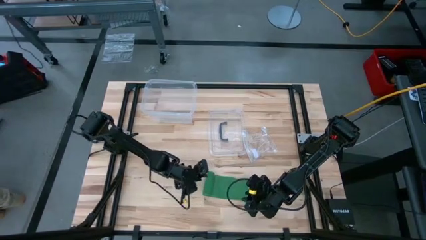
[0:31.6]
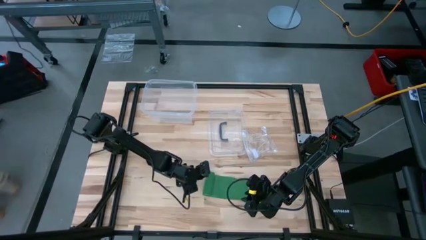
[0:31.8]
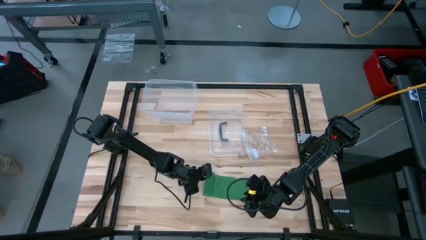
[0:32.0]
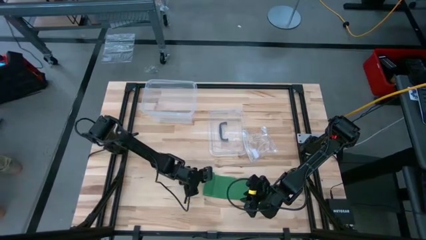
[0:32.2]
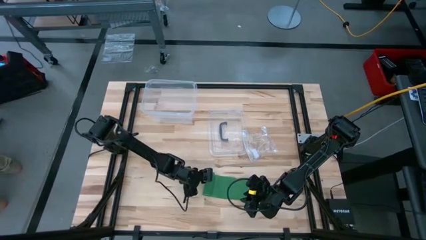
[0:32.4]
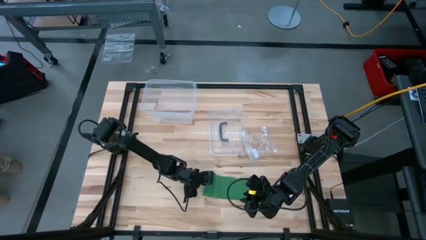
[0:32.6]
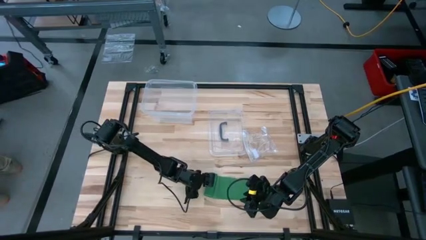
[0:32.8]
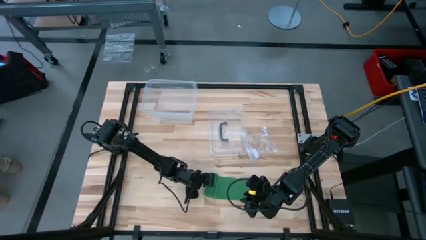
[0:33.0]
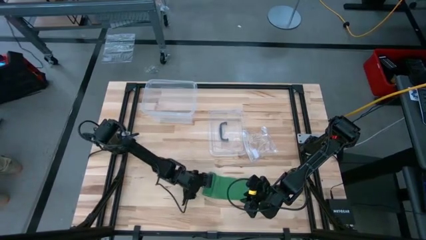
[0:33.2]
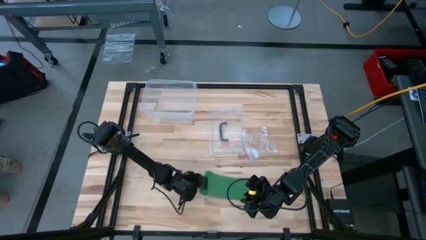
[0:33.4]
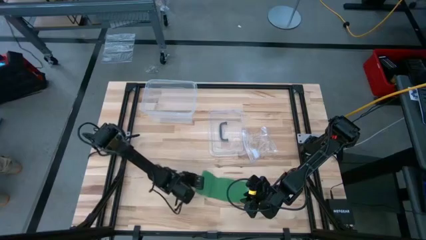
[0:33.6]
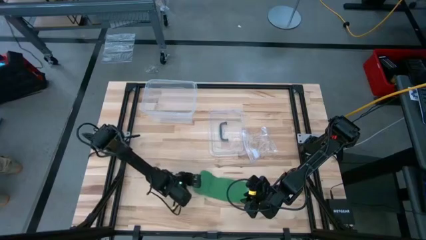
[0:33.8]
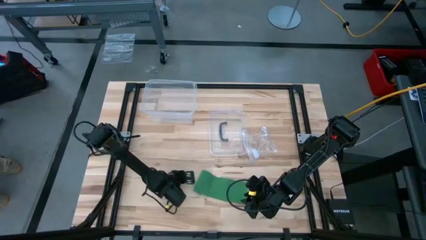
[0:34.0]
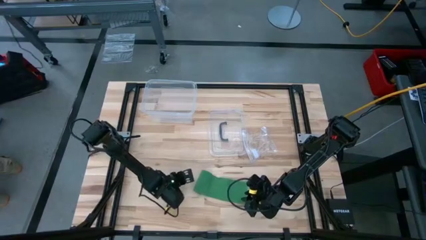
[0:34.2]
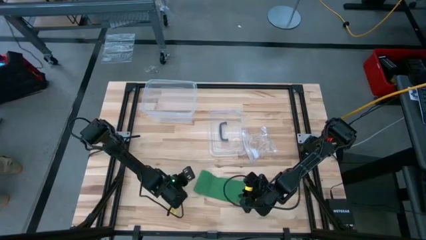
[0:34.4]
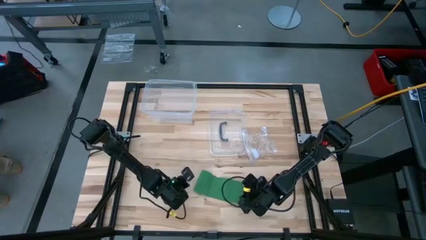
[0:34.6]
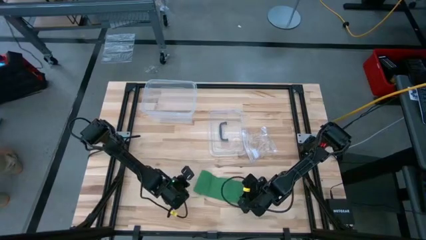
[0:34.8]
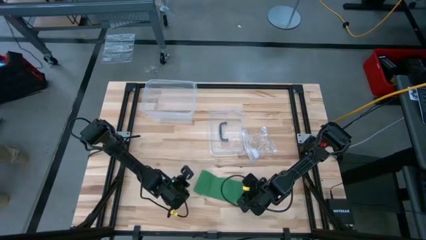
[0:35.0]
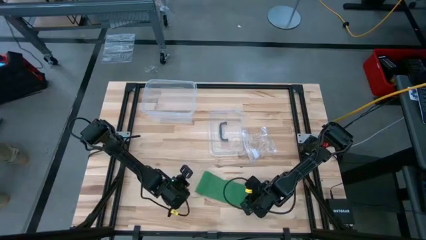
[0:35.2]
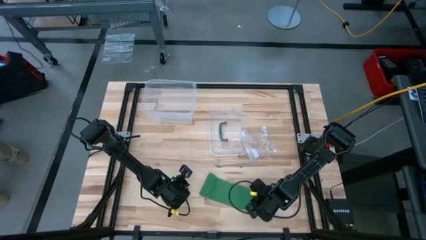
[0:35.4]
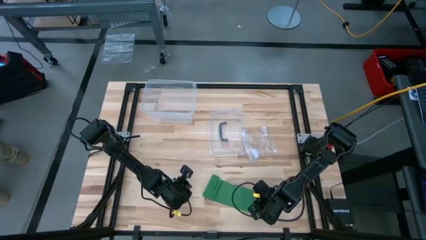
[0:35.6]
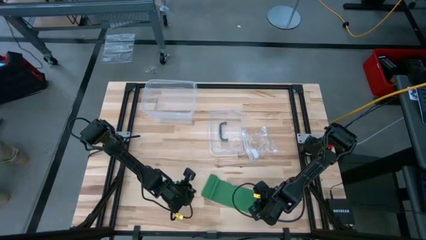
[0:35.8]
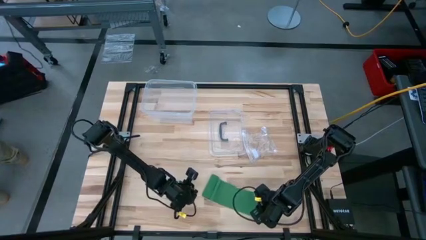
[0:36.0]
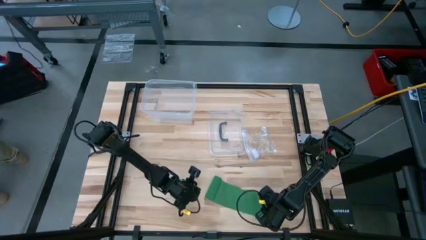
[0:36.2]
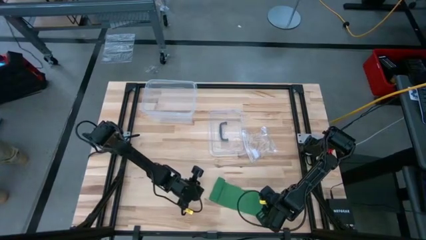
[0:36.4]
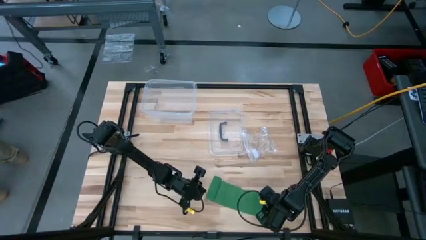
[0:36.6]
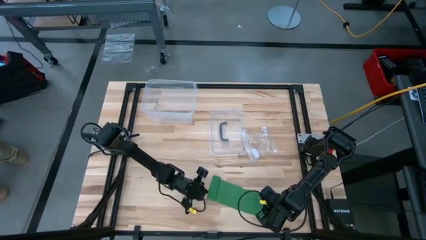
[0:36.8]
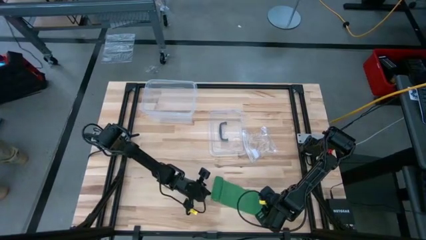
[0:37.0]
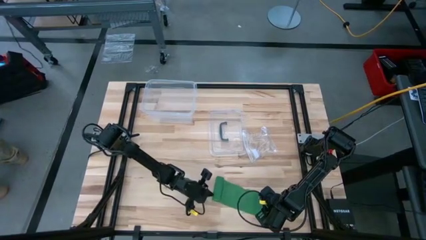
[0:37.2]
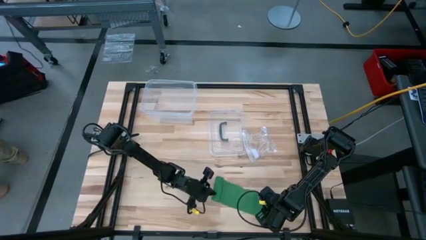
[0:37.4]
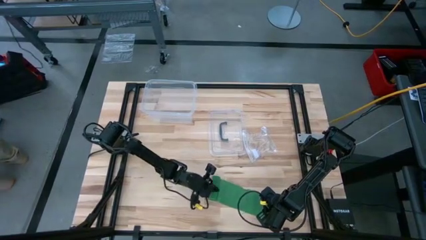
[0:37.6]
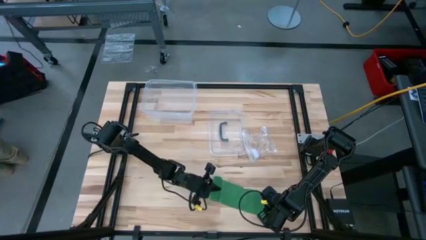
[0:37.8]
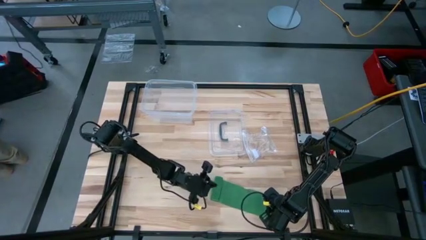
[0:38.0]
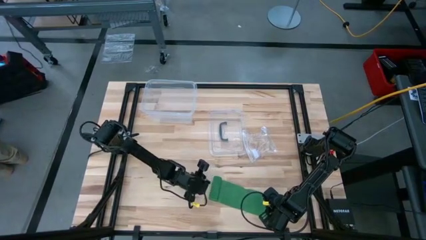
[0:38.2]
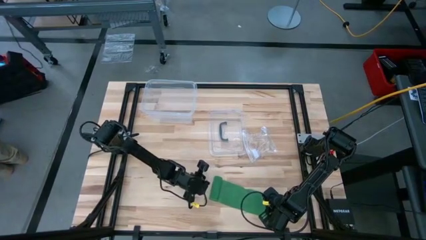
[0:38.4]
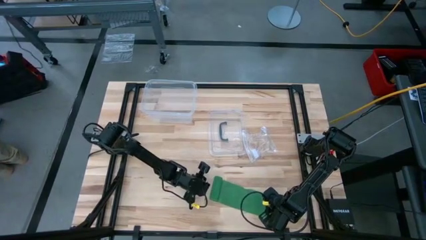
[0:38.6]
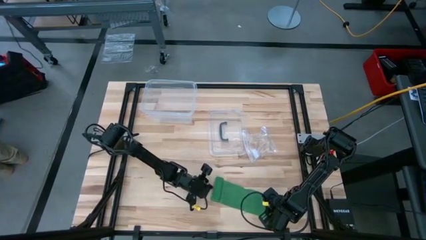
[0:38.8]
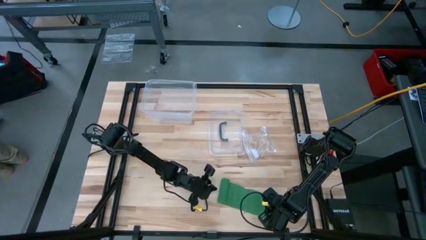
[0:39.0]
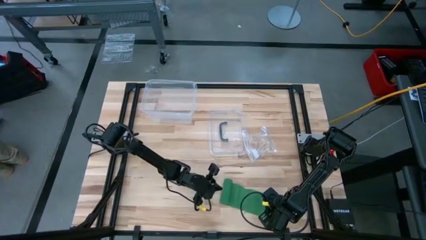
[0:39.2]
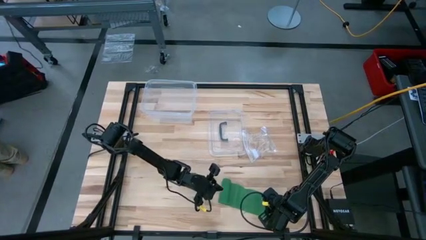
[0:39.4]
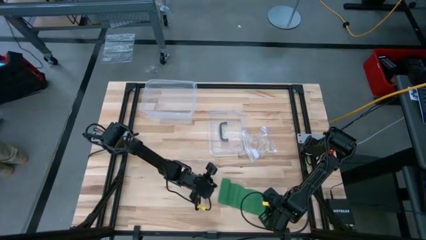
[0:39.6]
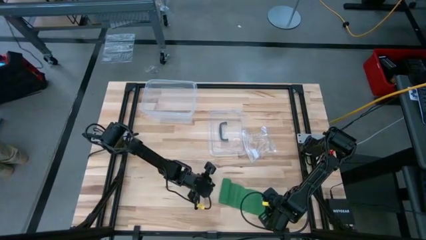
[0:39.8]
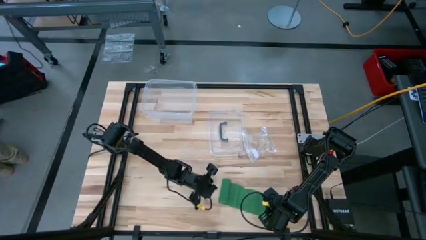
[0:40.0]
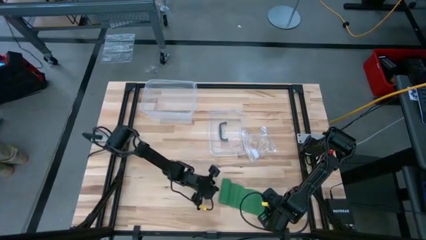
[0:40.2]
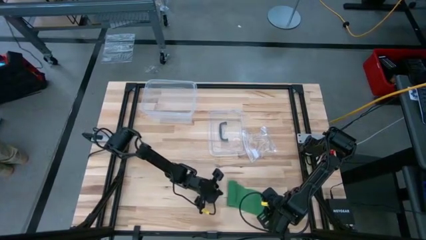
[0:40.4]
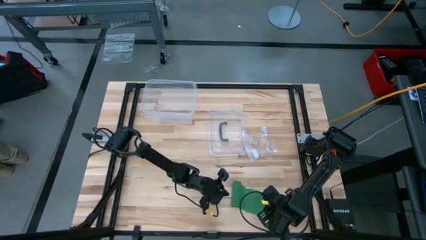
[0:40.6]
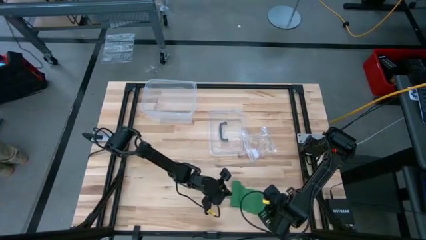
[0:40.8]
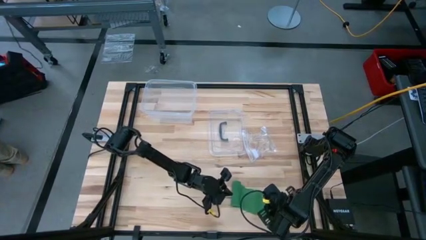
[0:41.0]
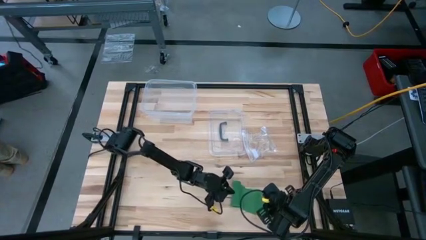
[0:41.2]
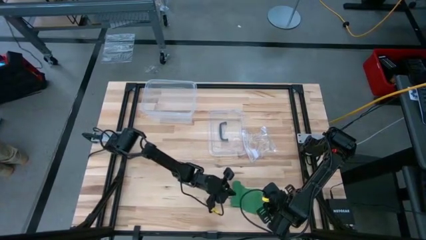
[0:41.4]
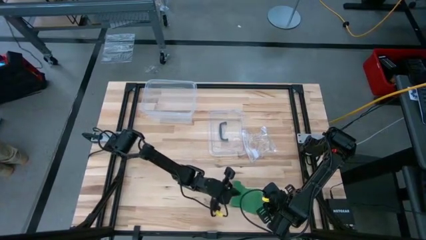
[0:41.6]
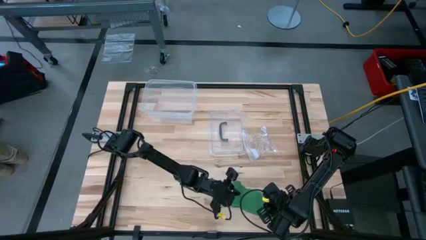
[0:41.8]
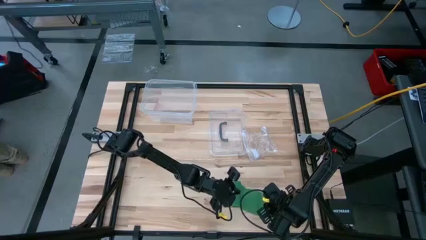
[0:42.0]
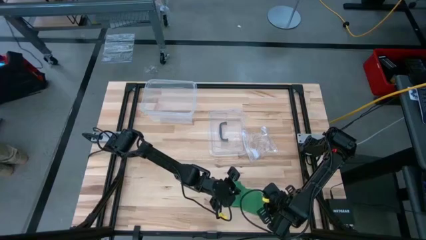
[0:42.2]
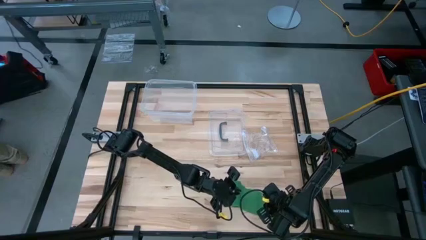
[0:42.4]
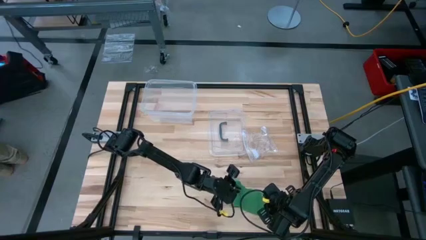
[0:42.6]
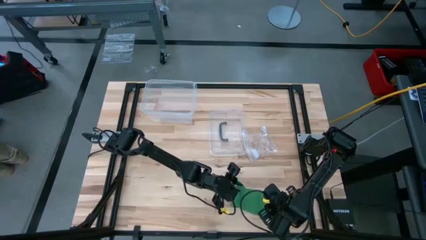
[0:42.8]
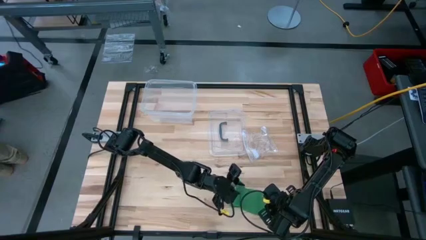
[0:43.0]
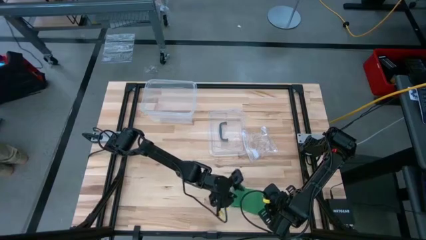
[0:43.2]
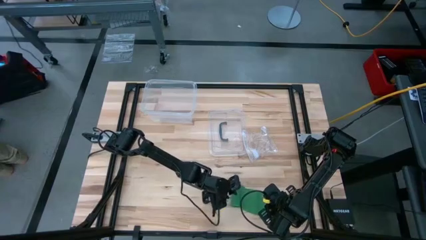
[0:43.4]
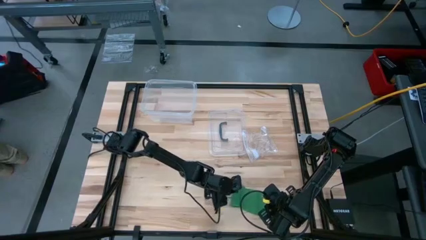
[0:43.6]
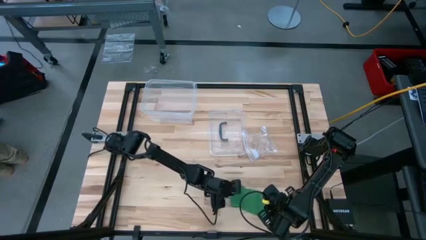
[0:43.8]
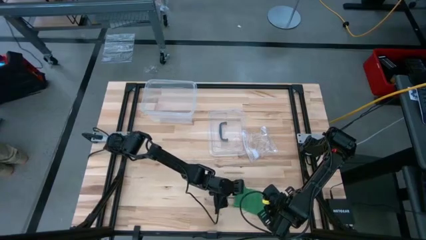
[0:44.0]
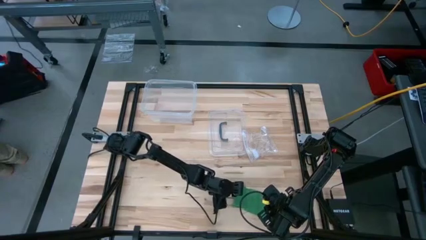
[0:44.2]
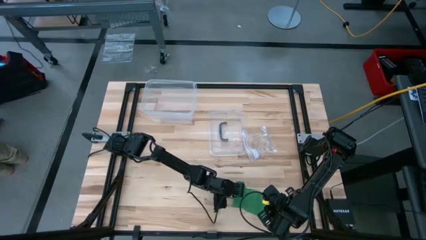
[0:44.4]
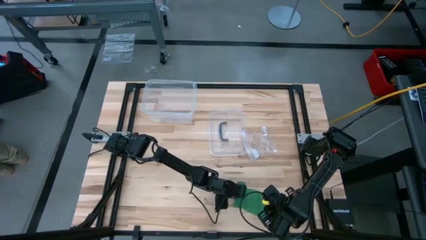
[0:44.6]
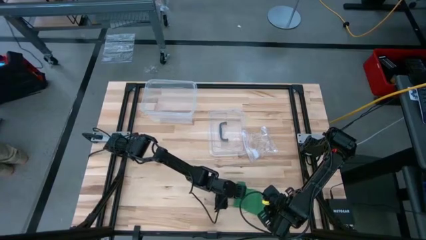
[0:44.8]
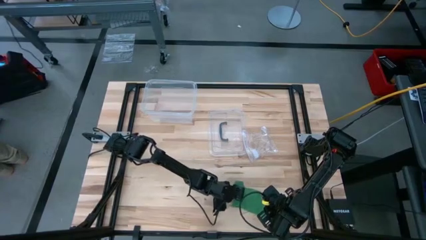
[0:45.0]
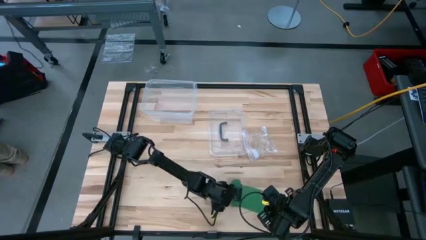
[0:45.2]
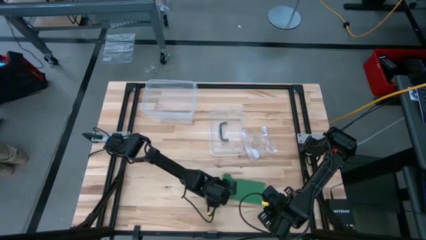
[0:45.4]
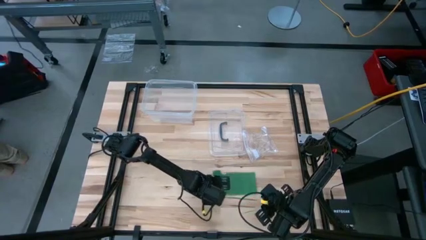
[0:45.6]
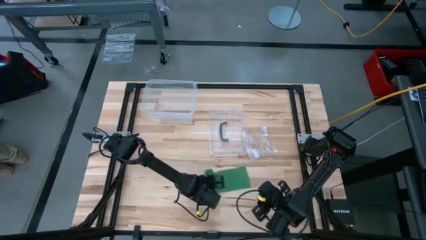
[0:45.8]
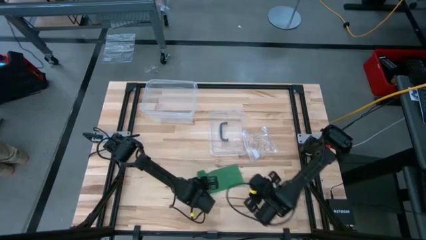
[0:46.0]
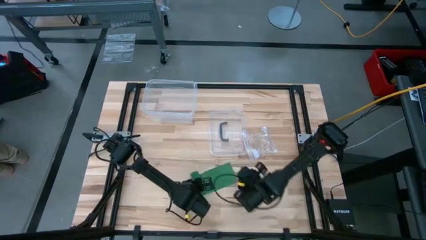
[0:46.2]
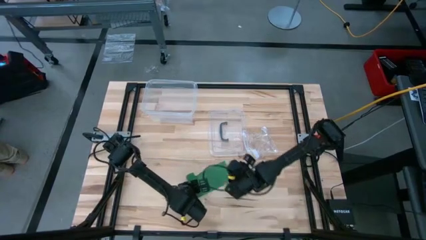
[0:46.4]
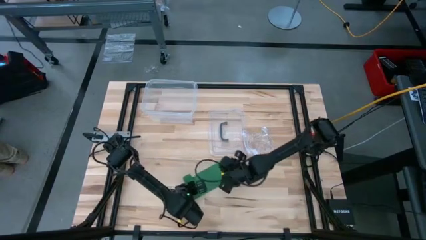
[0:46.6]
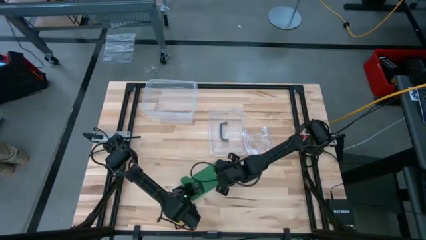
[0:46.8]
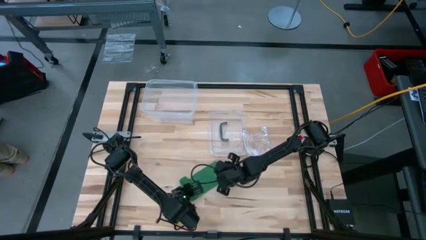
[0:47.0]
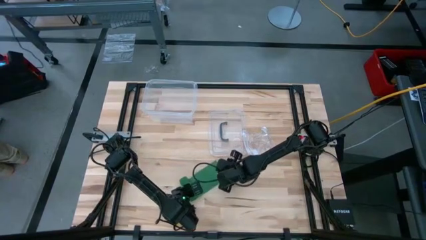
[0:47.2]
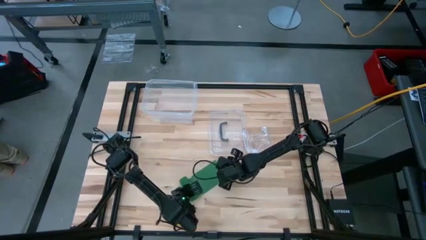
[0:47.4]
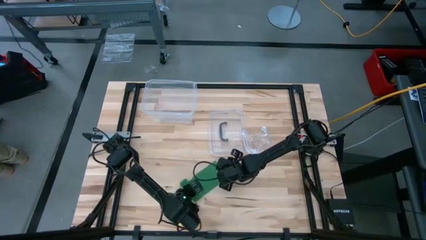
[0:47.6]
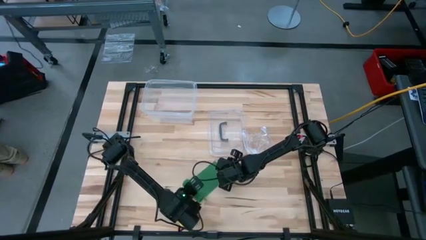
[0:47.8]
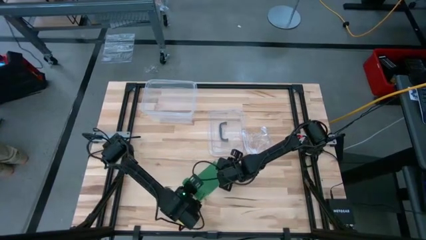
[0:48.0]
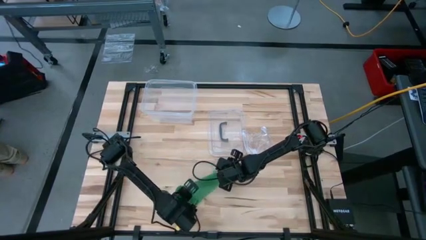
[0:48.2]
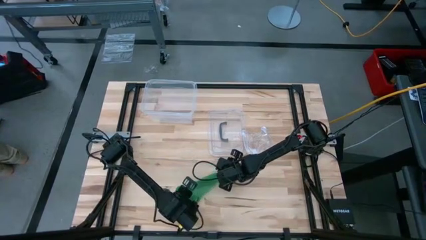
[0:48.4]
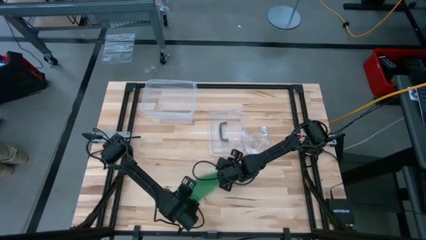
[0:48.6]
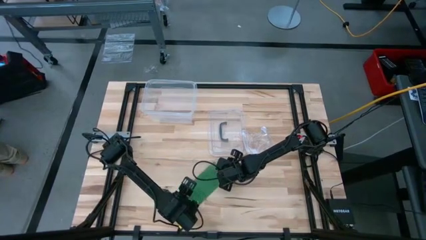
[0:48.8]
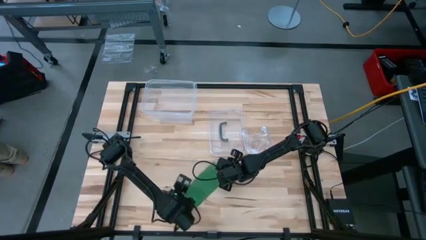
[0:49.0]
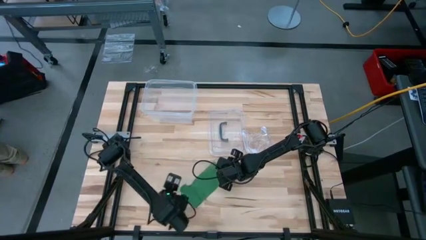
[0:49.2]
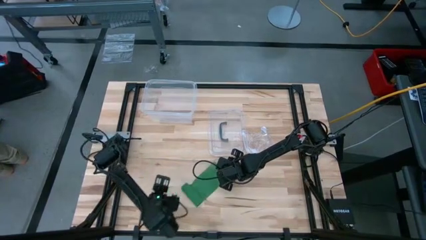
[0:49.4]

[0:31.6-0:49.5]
Task: Roll bandage
Roll the green bandage
